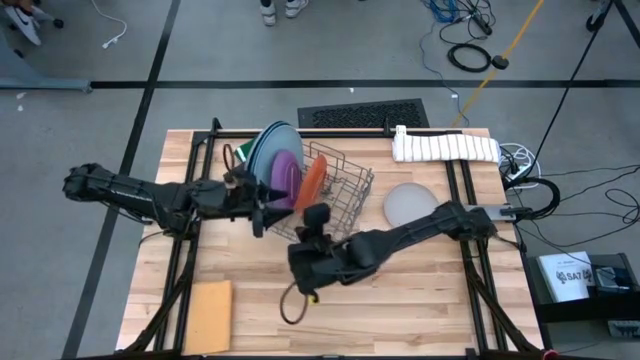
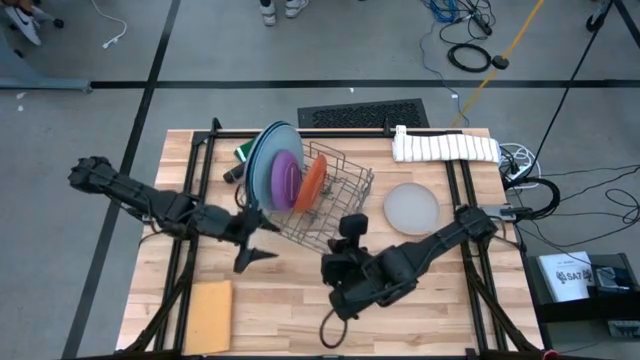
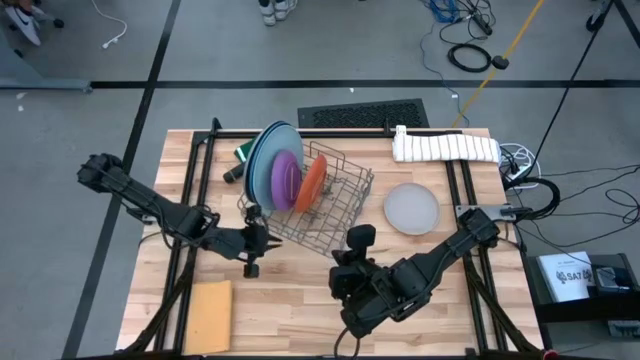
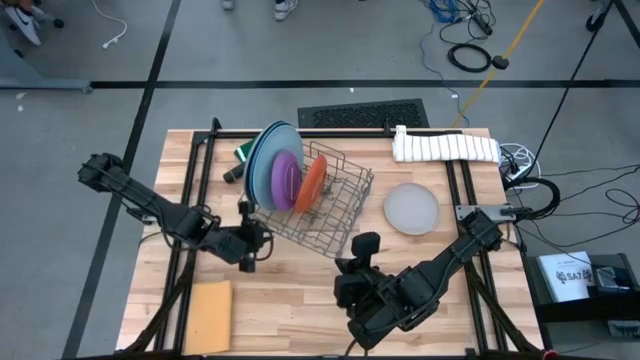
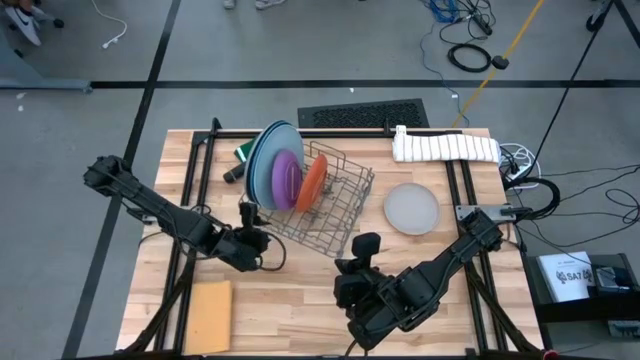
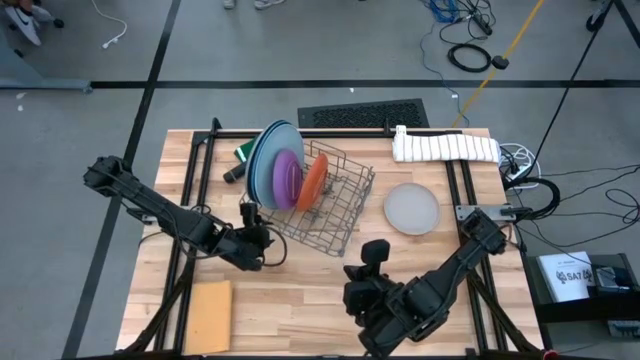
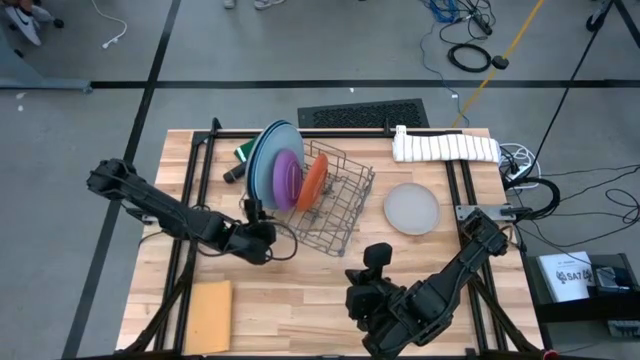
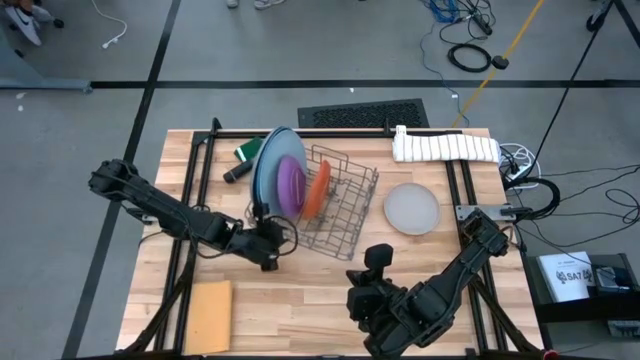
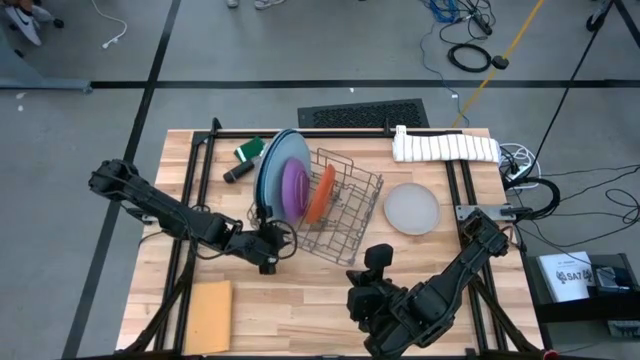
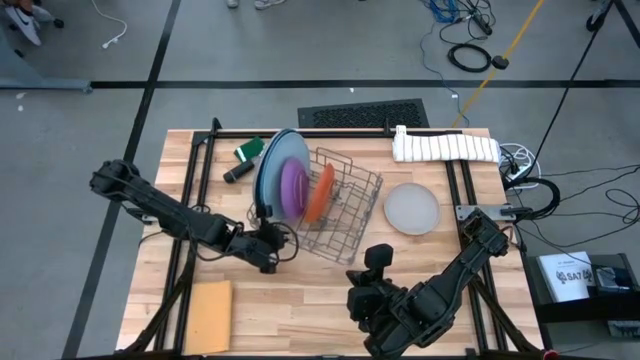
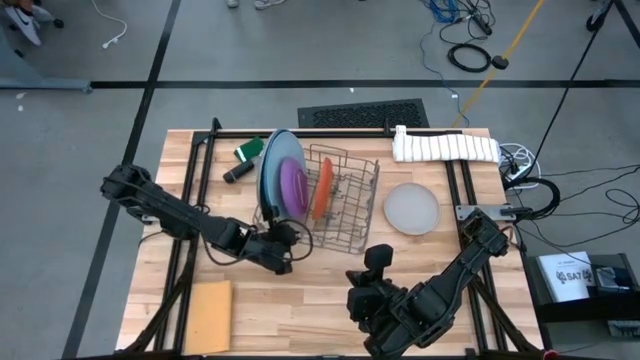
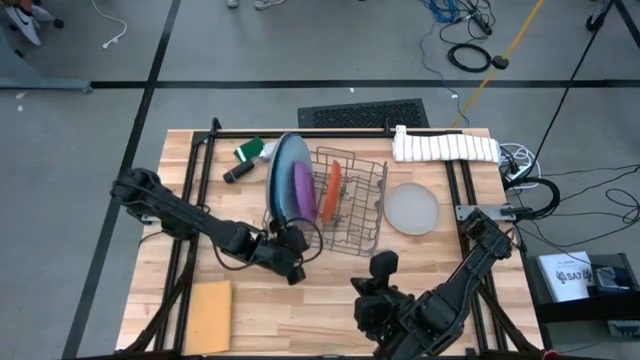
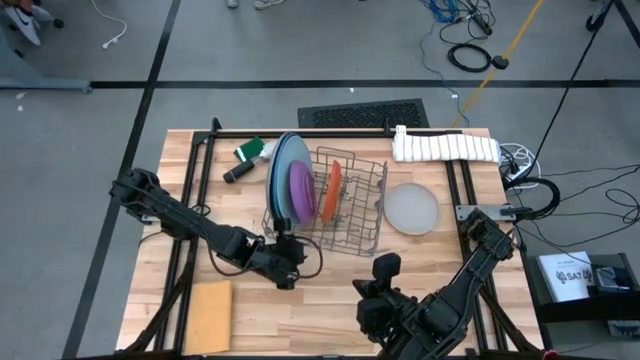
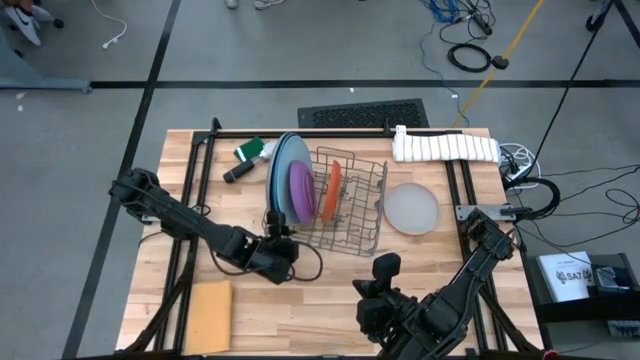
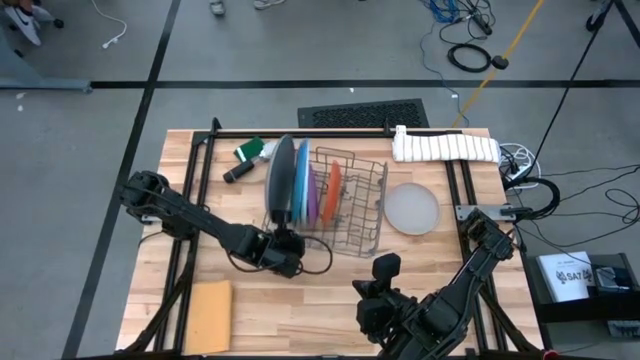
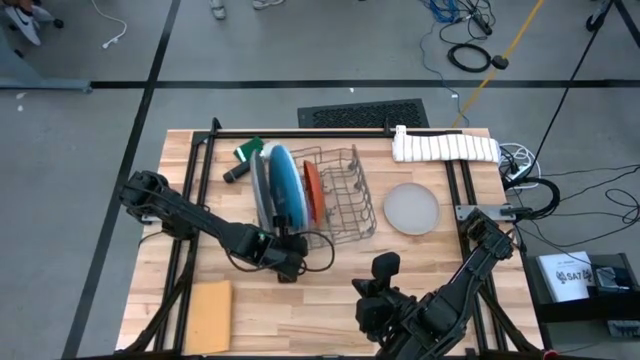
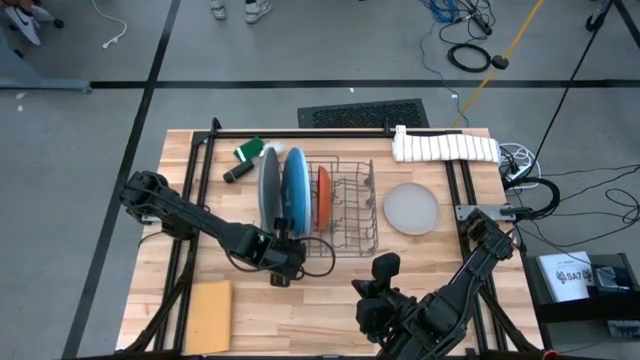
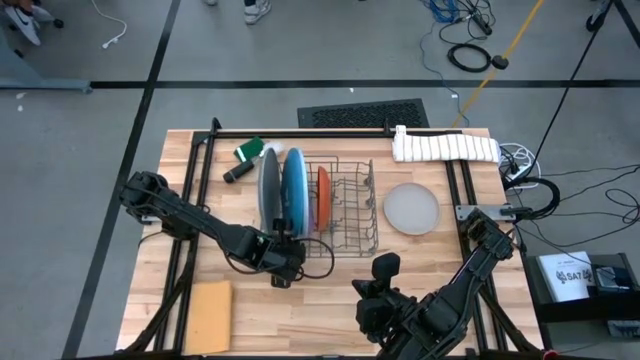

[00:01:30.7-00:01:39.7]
Task: Sort dishes
Adjust the green dish rack

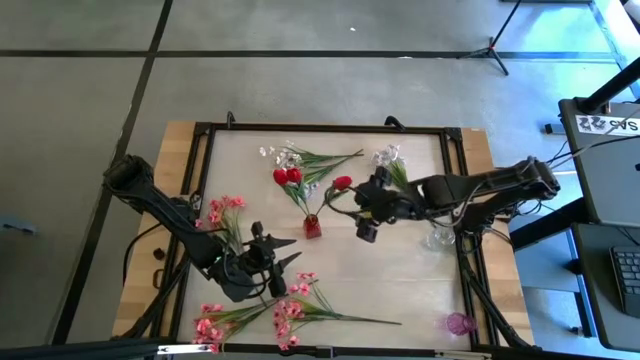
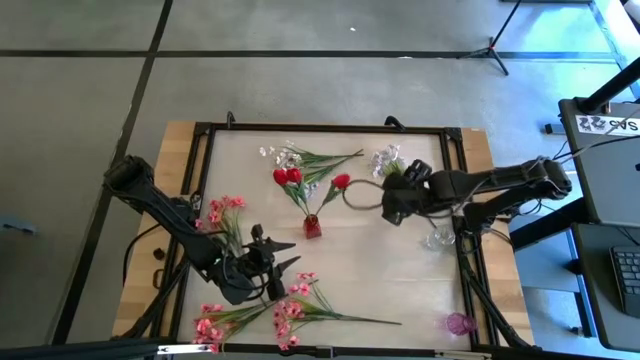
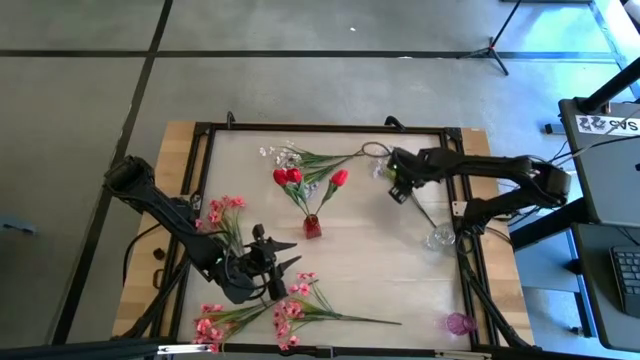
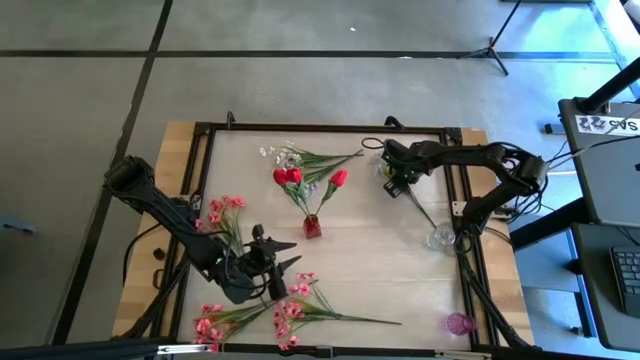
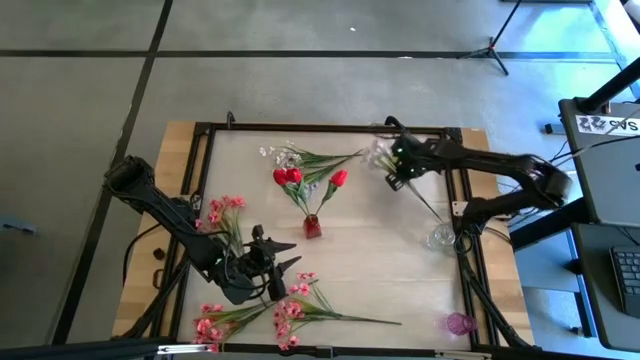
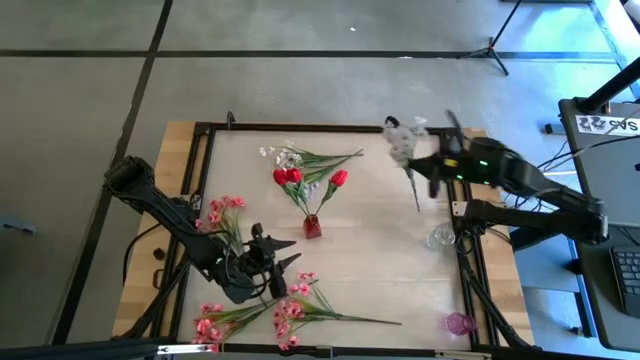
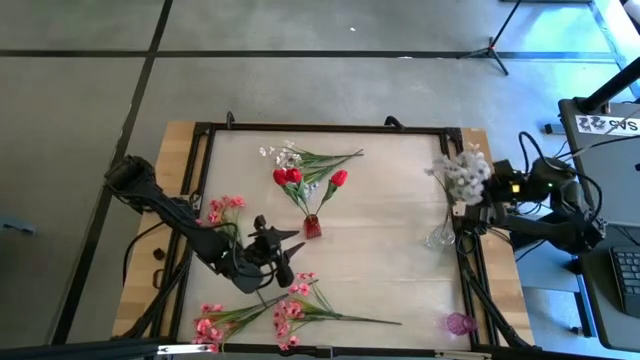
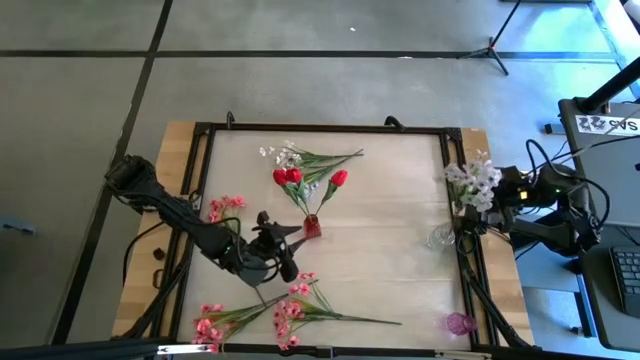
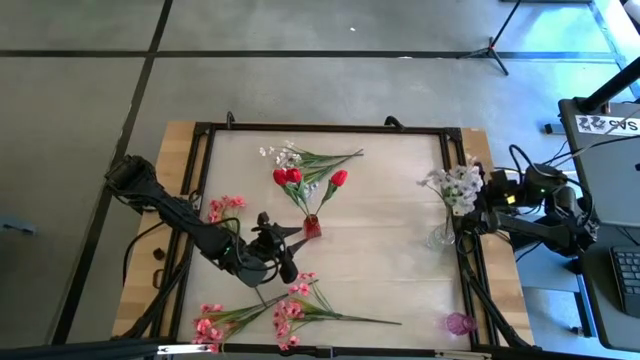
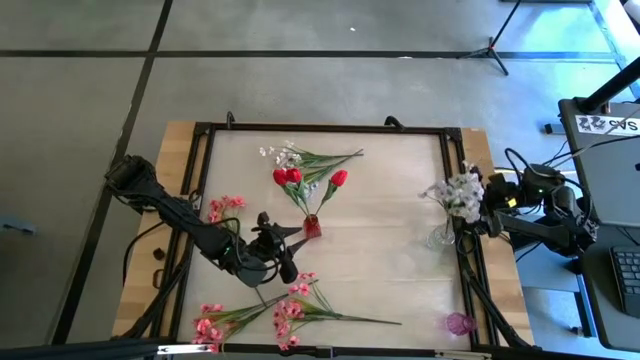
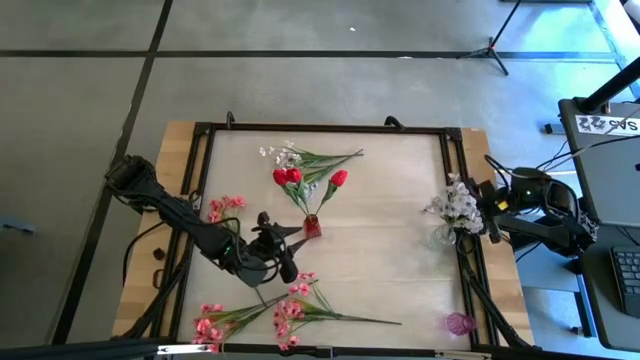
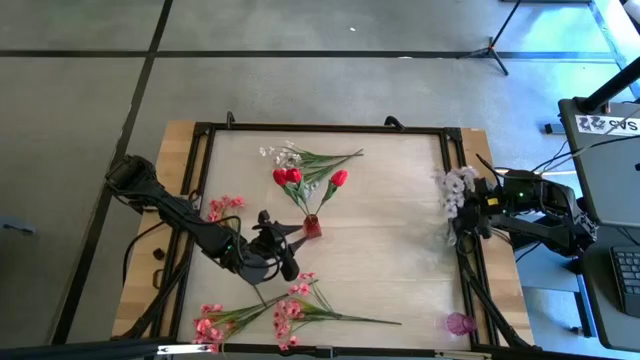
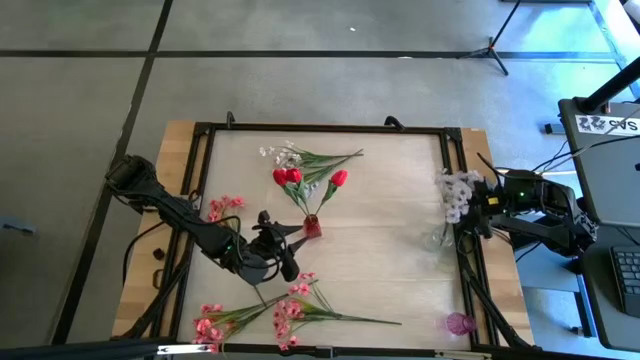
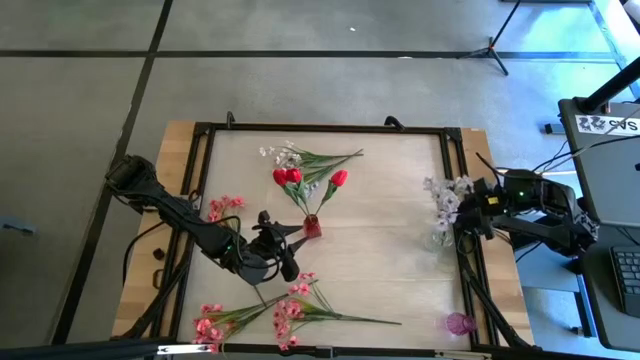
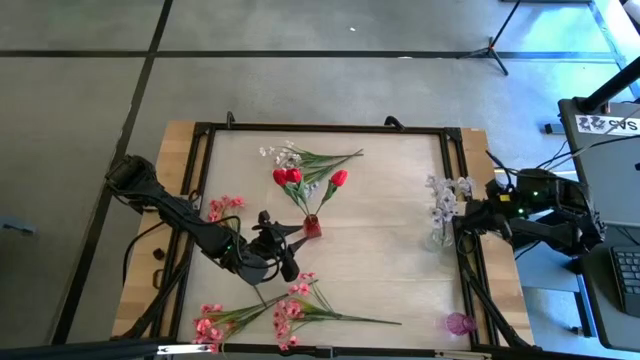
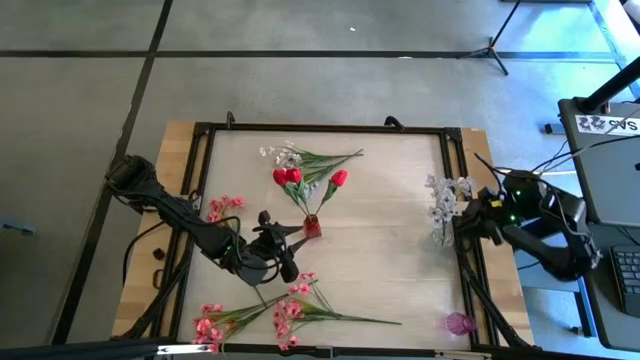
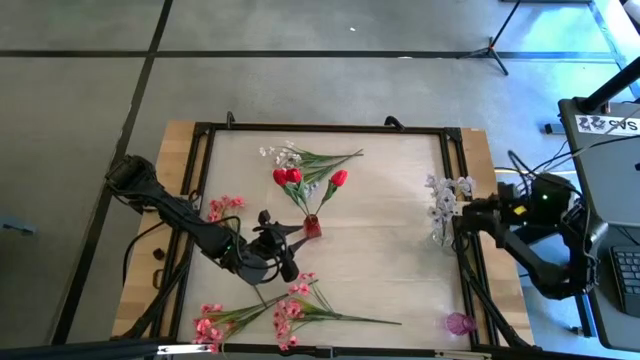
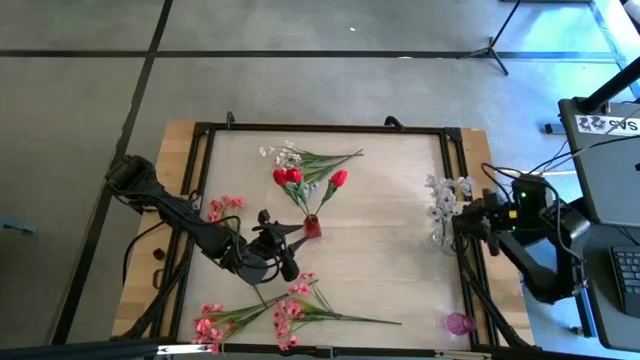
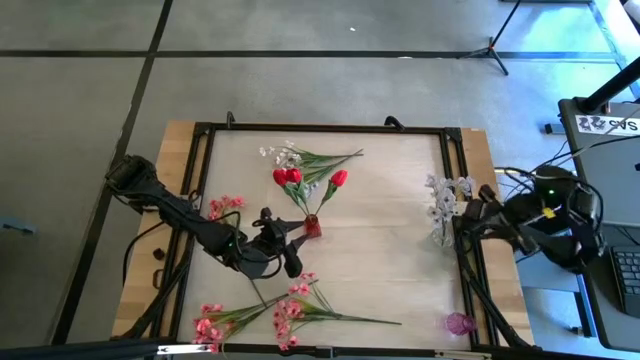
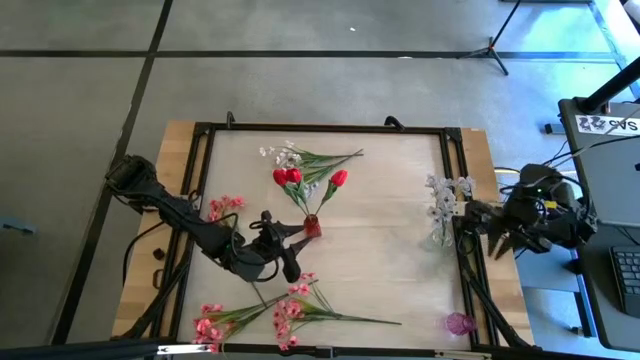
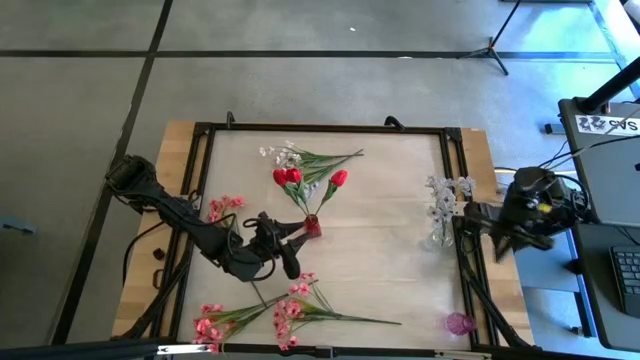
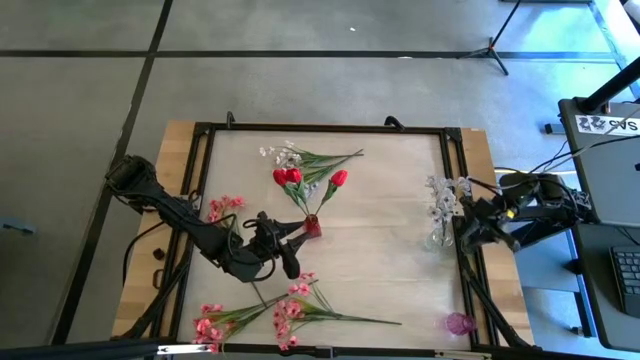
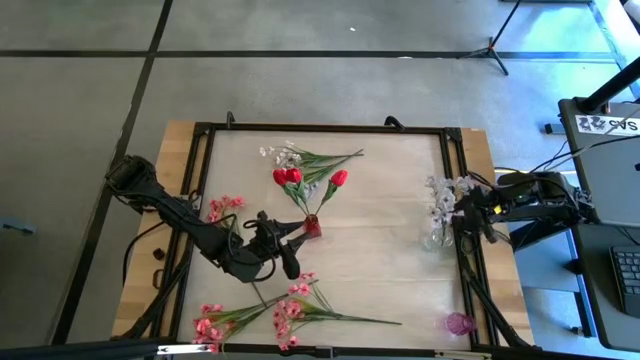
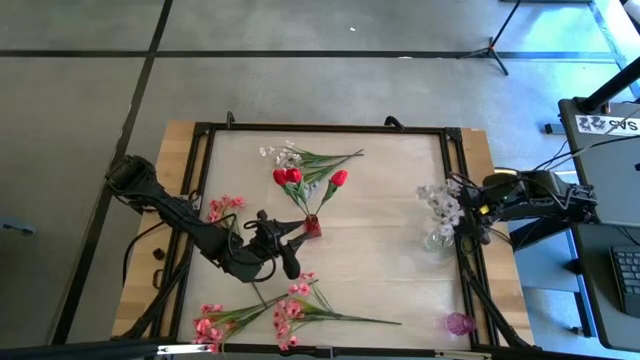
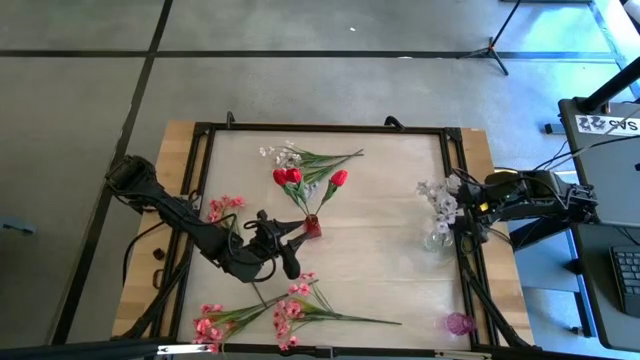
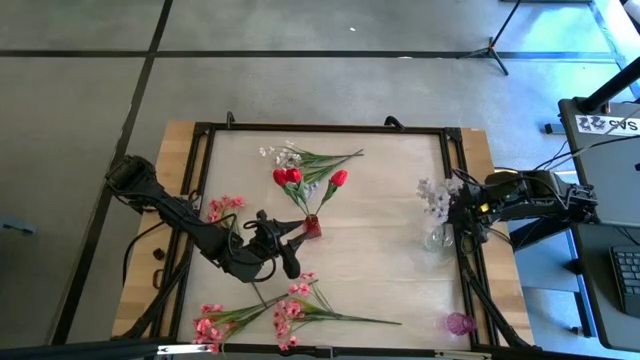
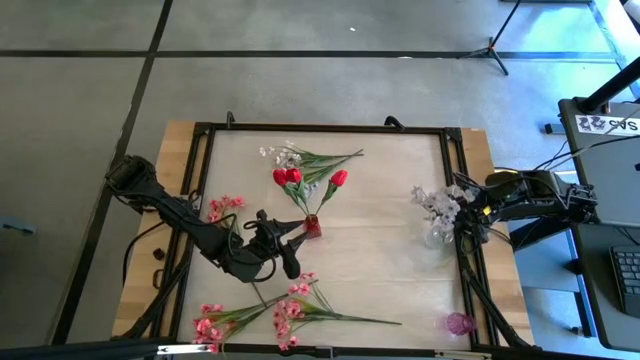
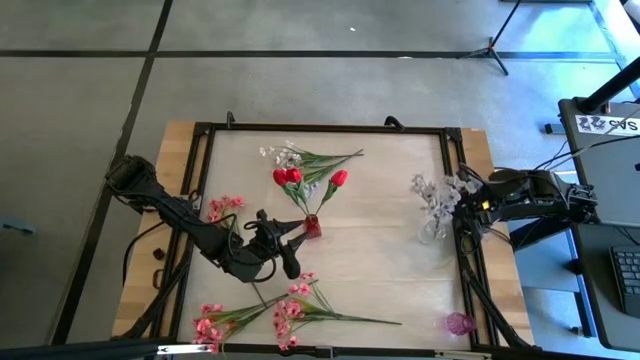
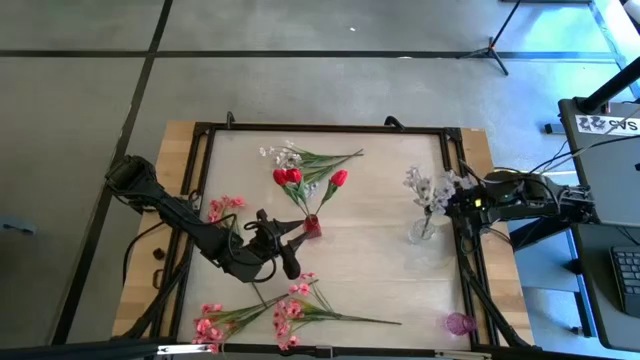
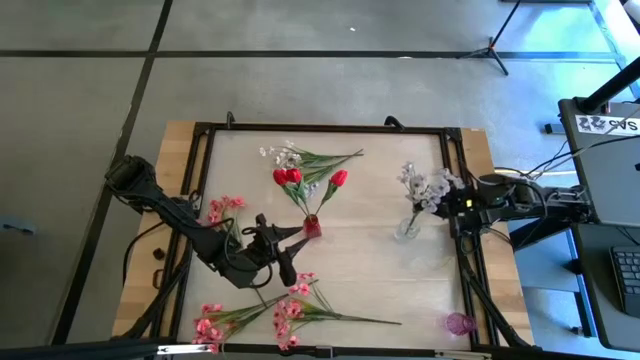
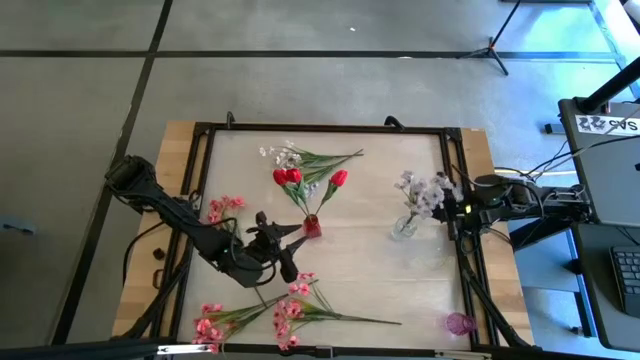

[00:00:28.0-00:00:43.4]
Task: Sort flowers into vase by color
Put the right white flowers into the transparent vase
